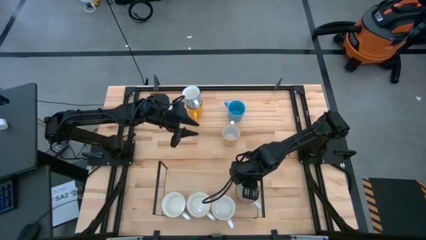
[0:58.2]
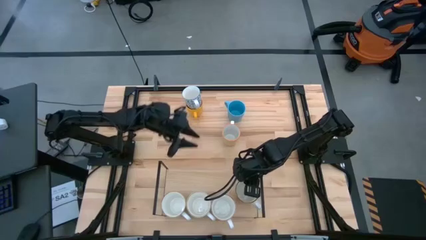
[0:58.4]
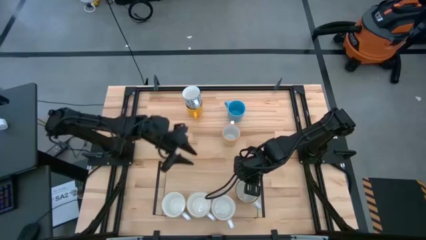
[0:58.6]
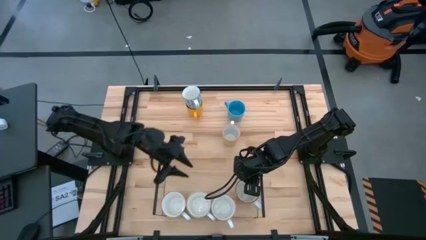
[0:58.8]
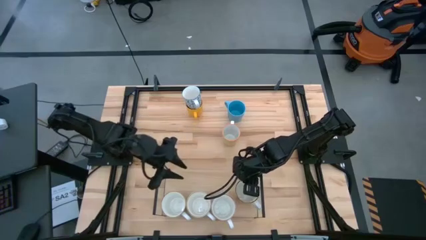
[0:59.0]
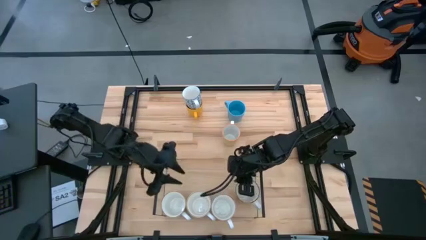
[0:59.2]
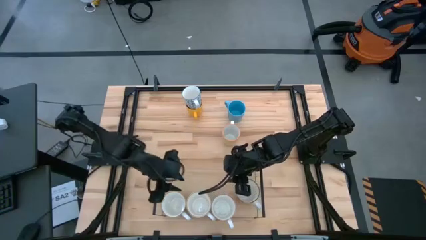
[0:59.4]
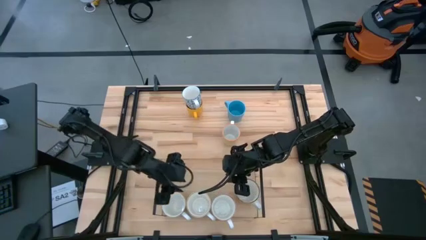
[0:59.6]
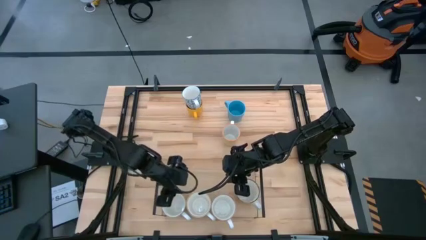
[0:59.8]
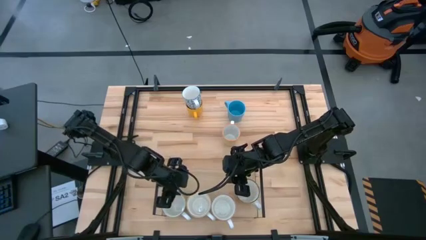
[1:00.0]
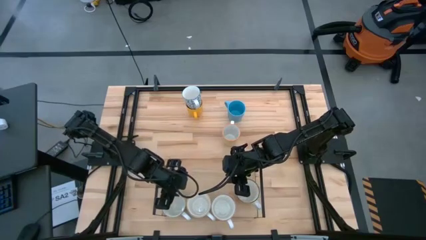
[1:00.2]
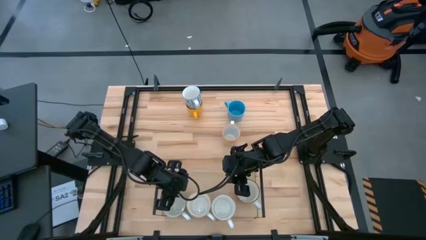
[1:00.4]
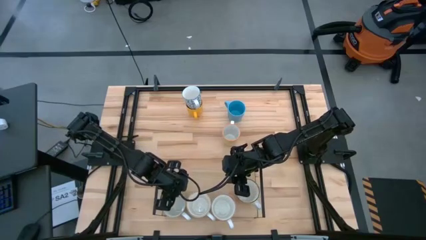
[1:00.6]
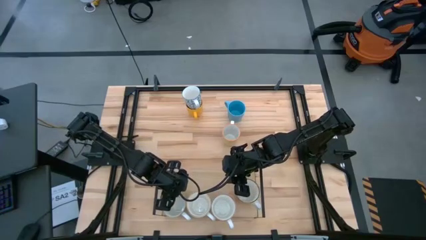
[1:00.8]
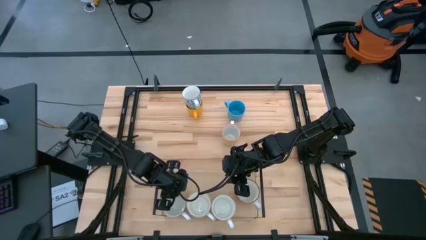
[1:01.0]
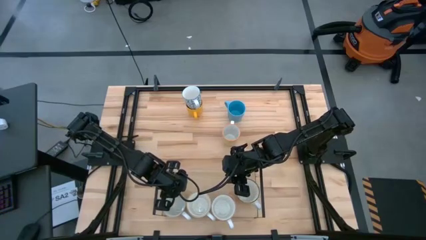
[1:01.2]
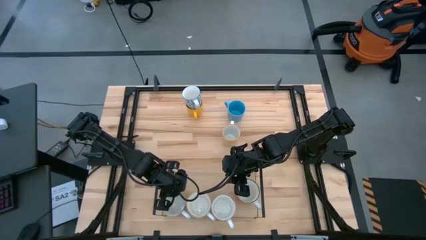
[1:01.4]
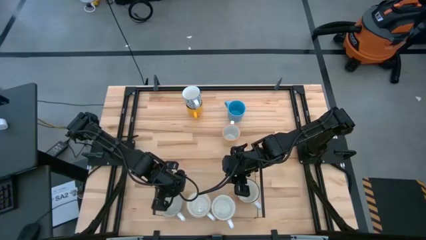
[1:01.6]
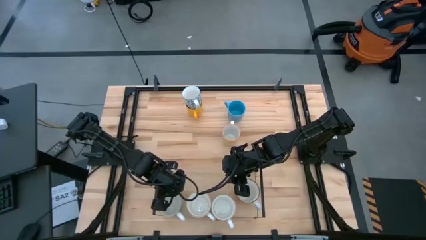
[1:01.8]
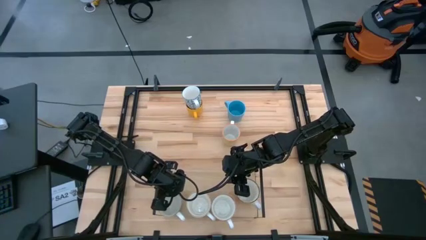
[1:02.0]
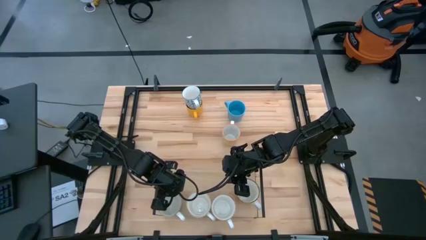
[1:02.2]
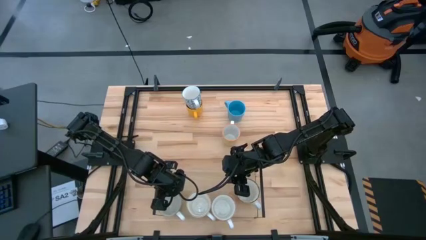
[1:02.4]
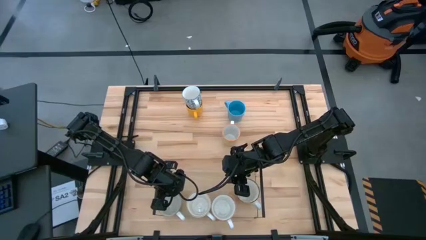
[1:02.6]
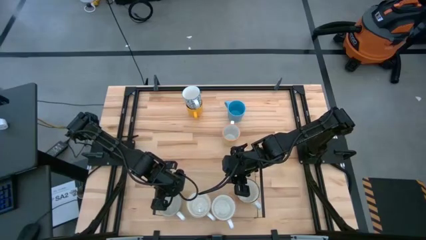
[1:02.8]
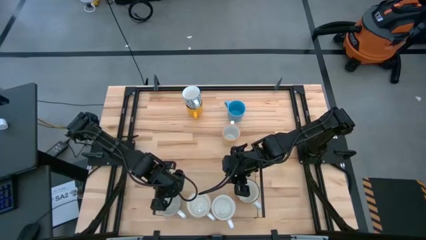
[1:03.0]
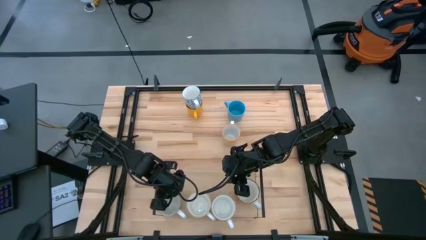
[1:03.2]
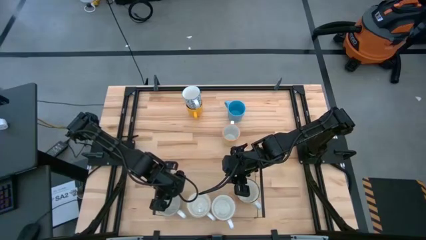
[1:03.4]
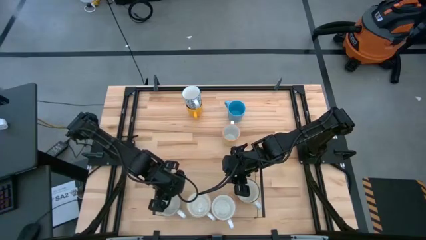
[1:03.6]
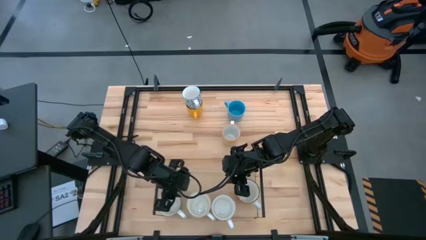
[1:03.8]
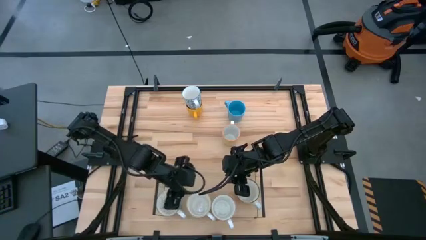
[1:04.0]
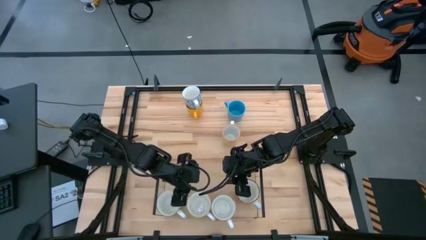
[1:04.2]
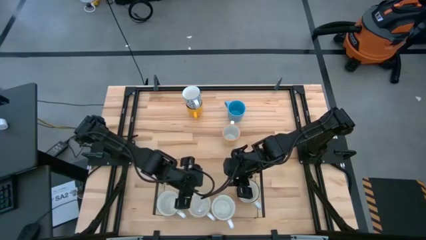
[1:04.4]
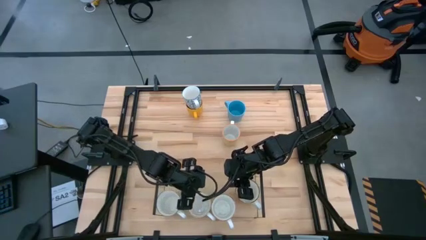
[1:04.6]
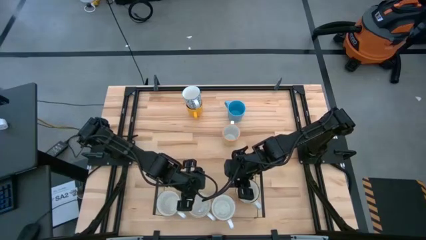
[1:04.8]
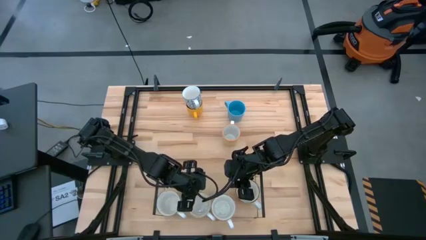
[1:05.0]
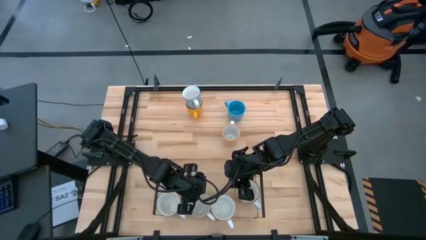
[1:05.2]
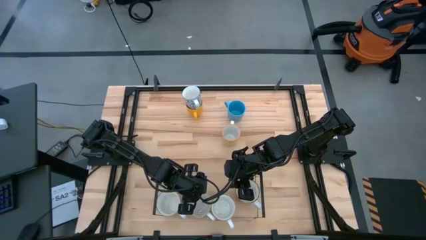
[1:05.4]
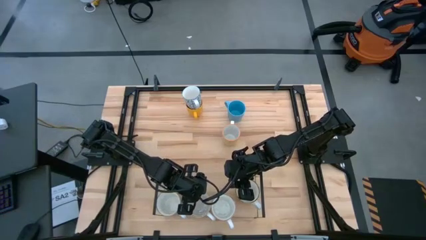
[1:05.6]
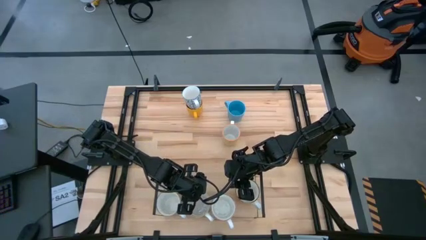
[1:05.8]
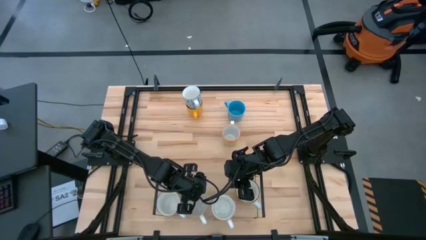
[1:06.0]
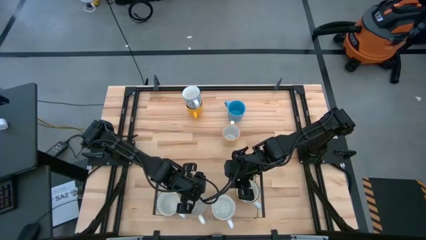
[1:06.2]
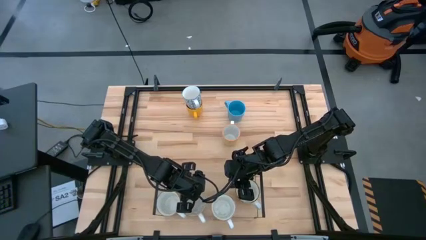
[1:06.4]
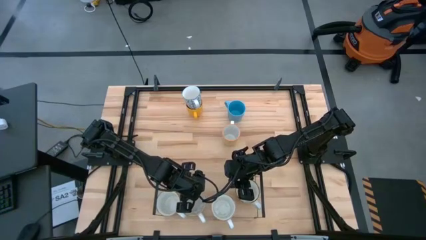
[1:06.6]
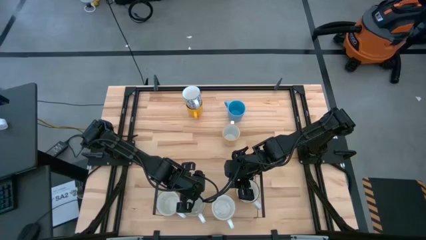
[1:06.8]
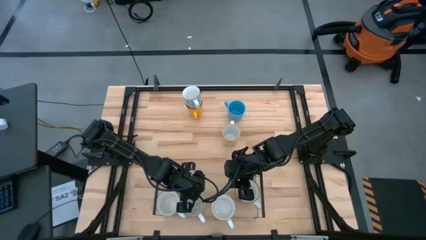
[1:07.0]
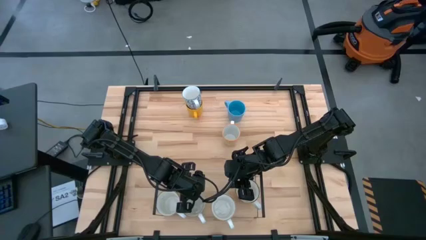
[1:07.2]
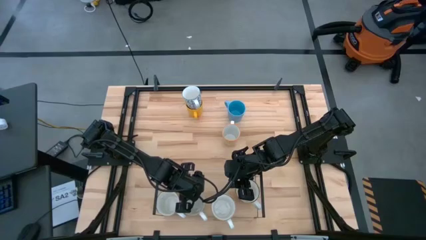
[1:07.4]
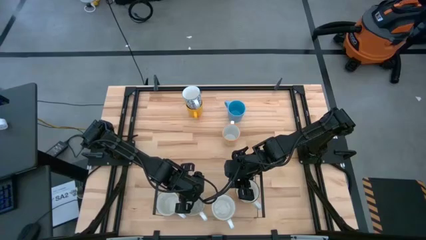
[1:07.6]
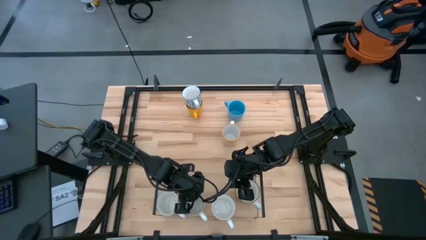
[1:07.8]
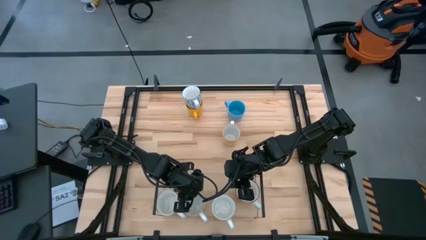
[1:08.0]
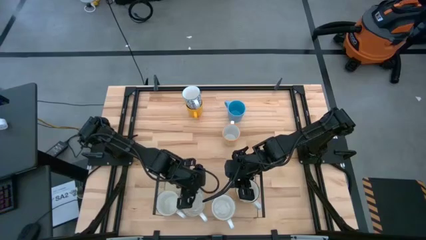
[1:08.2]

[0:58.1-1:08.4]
Task: Place coffee mugs
Adjust the mugs on the shelf
